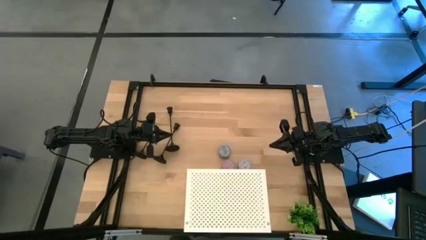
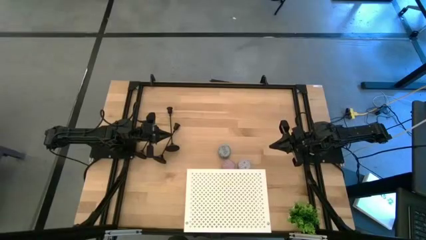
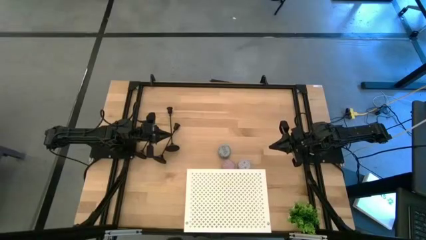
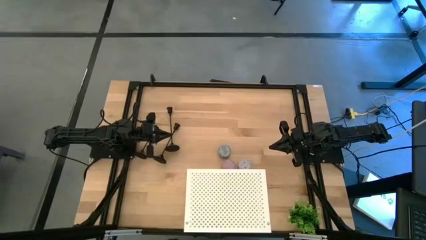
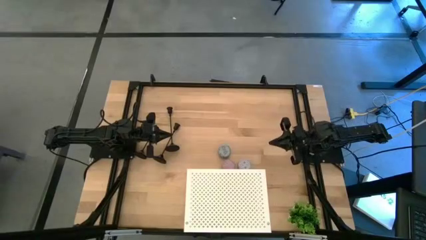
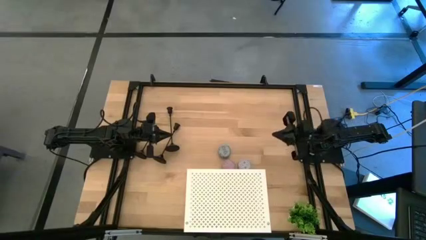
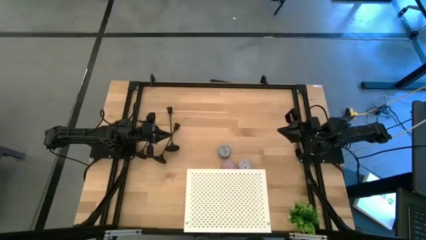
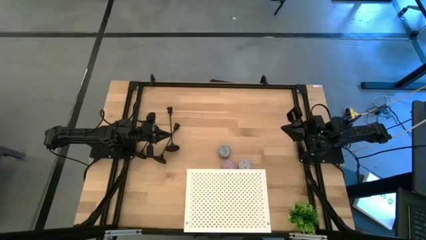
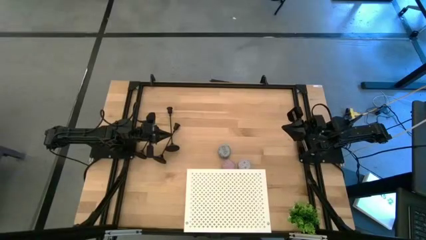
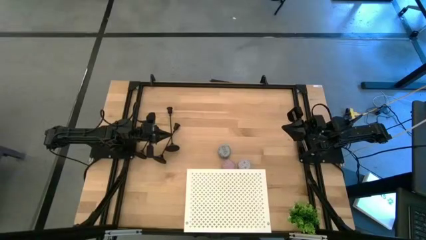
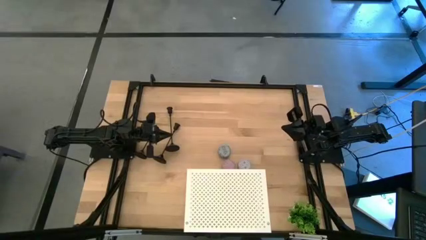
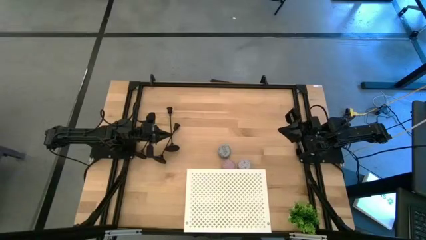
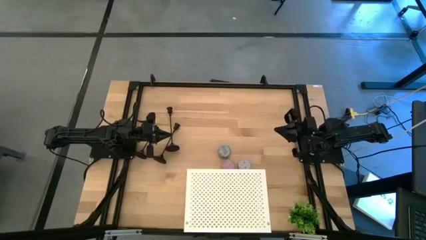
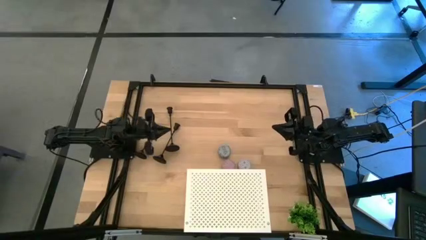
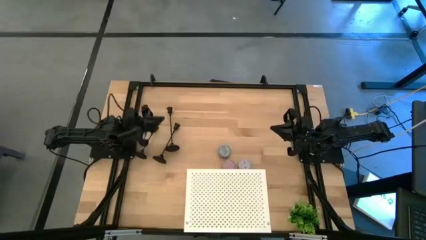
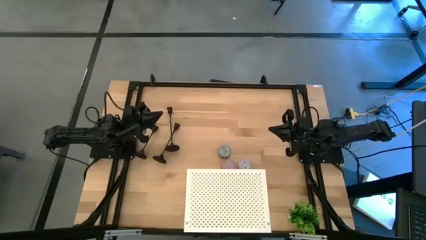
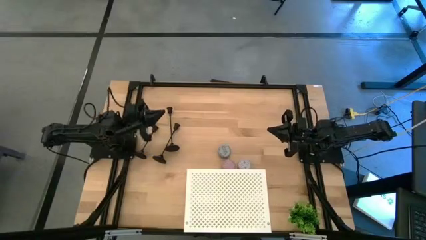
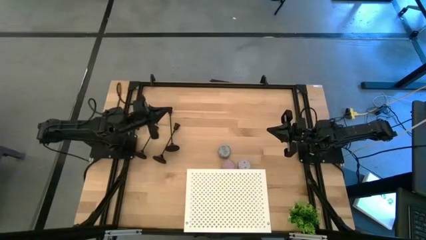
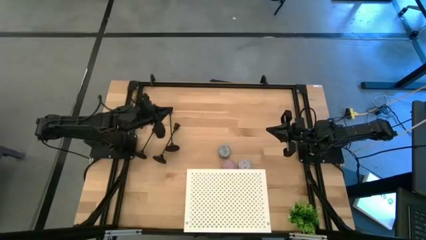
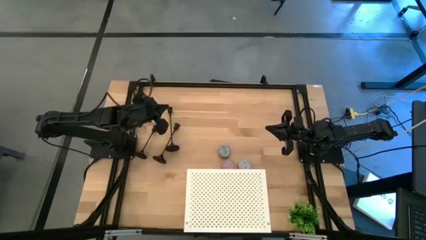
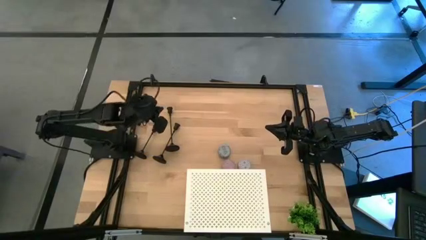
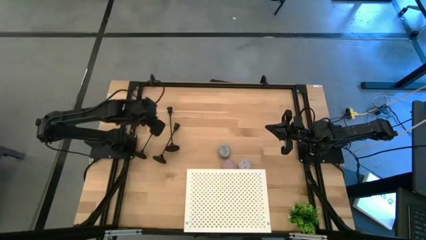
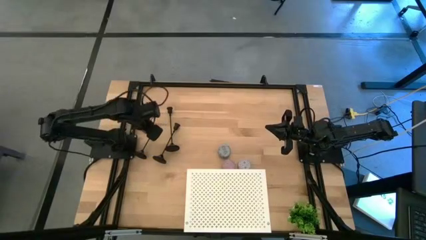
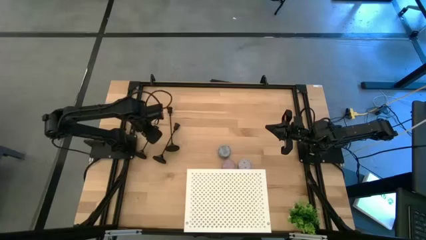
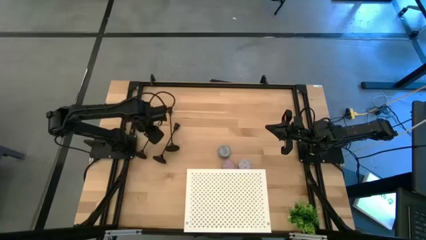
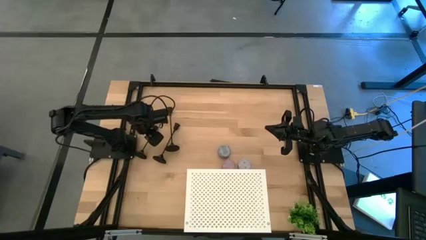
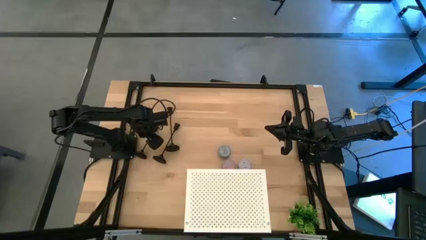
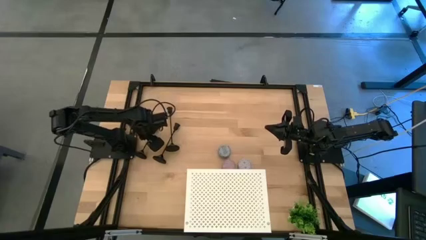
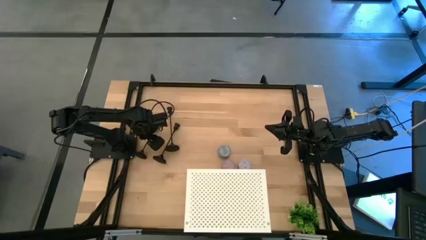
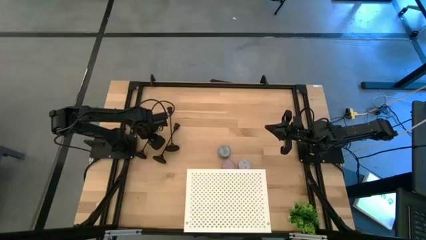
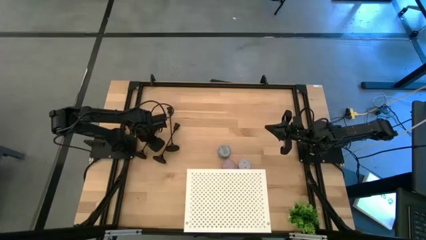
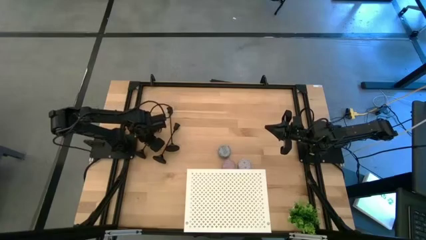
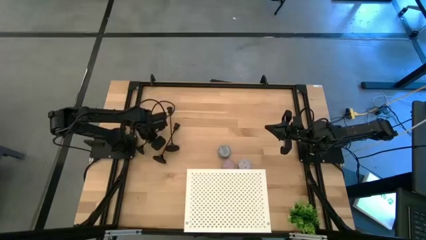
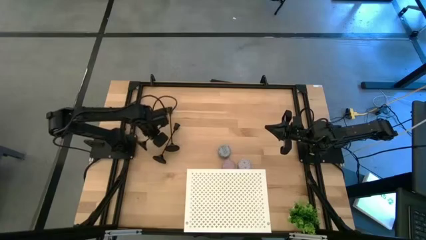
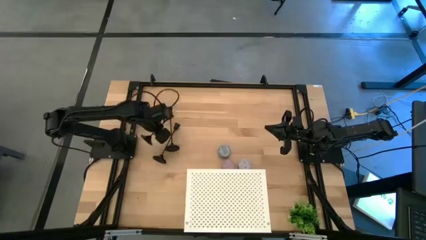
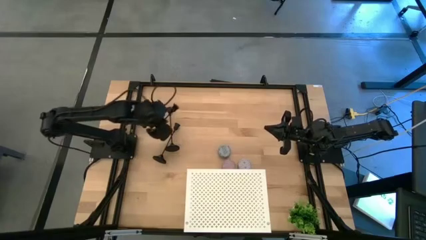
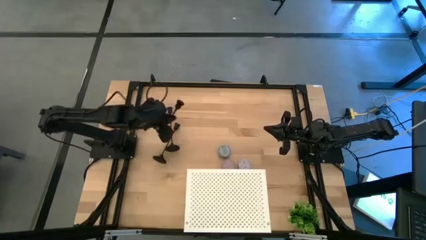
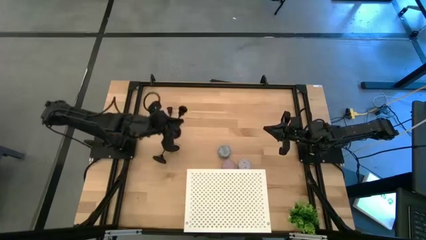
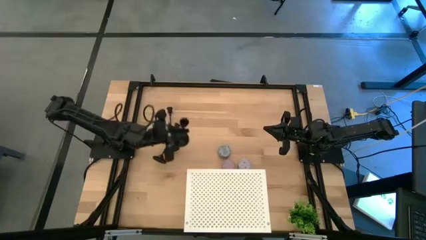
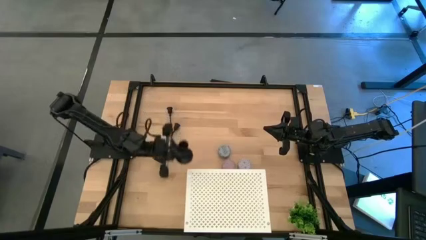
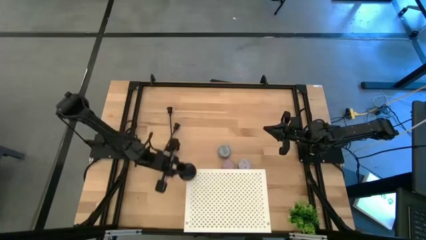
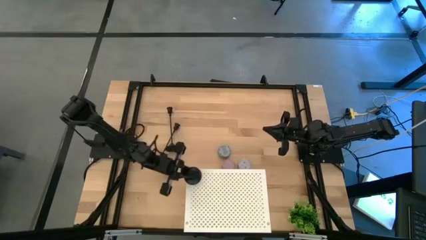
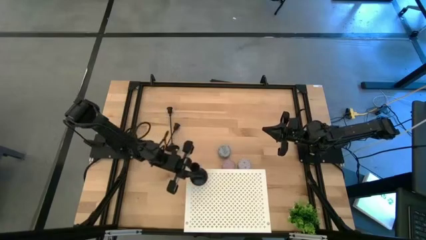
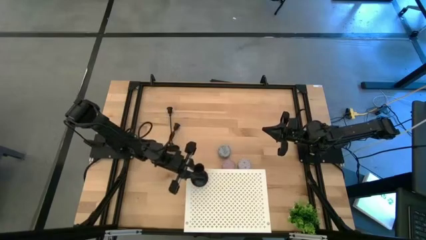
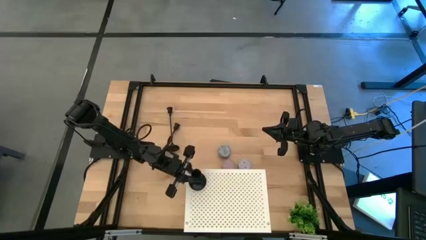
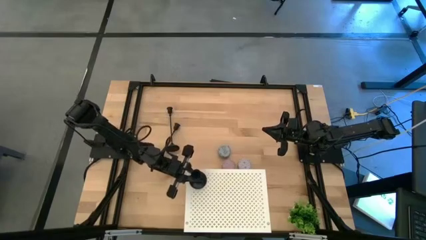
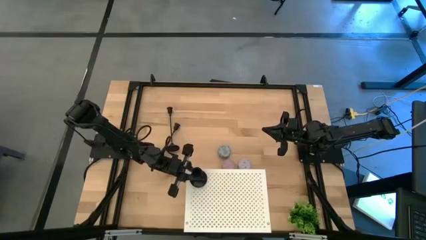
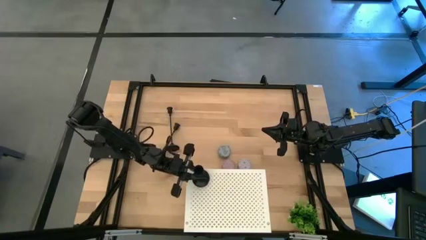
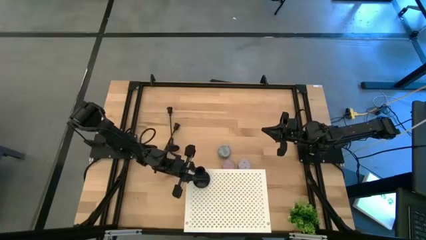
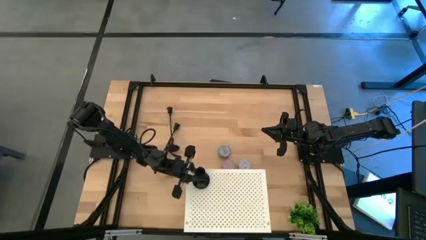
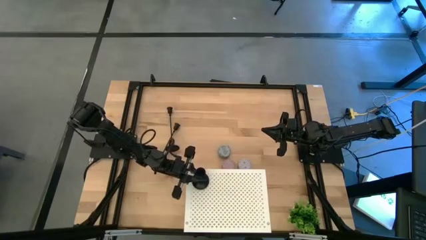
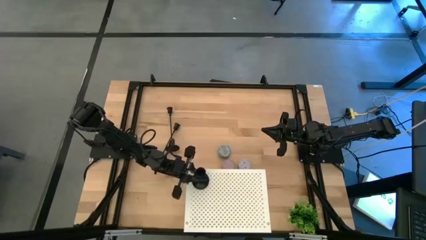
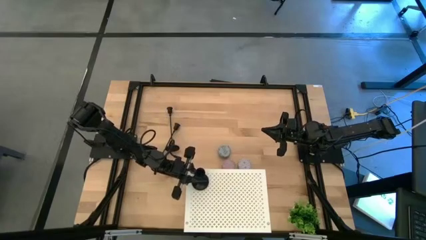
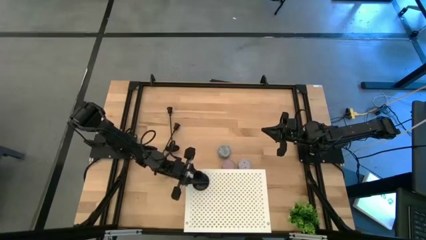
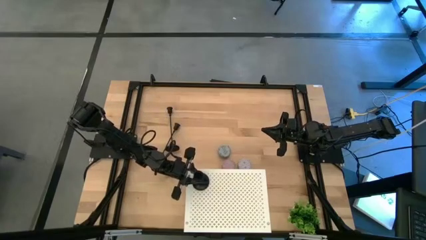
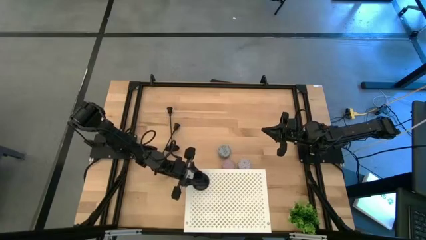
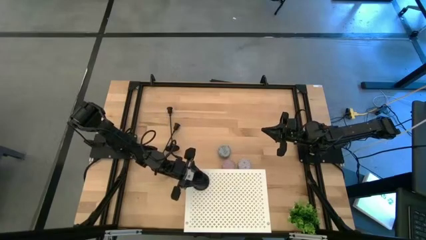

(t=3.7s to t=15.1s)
Task: Pick & Place candle stick holders
Put the left black candle holder on the shelf
